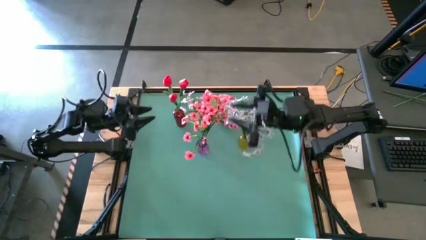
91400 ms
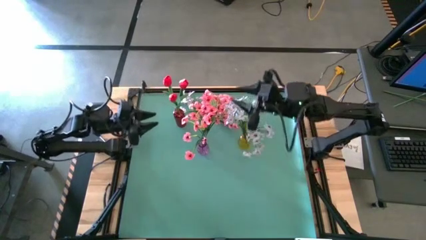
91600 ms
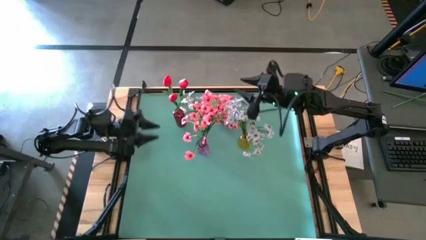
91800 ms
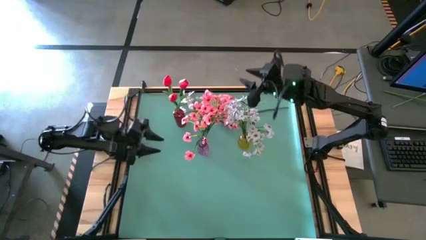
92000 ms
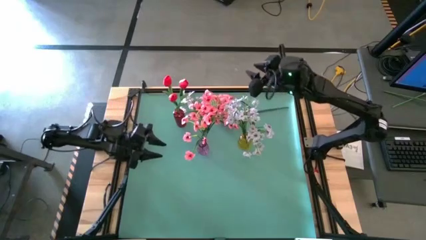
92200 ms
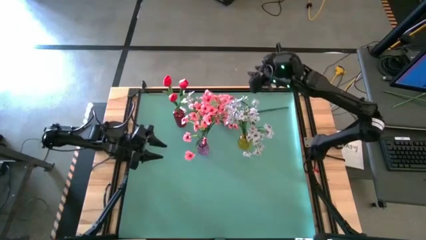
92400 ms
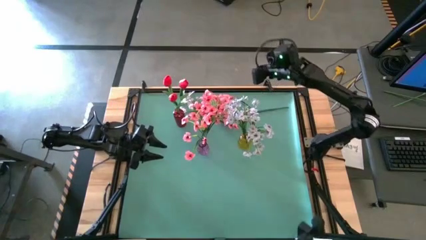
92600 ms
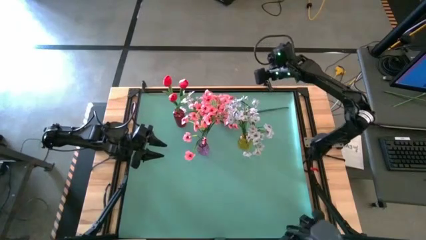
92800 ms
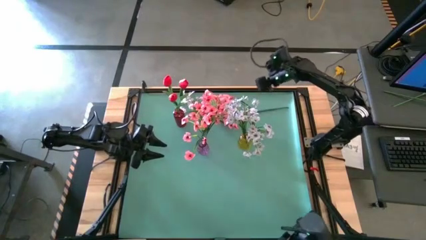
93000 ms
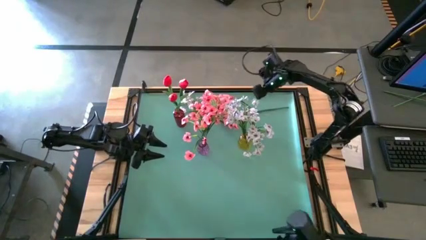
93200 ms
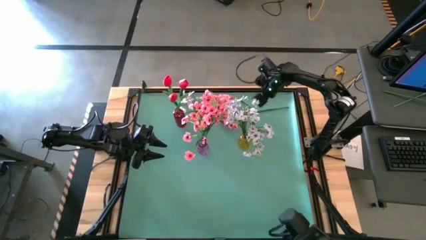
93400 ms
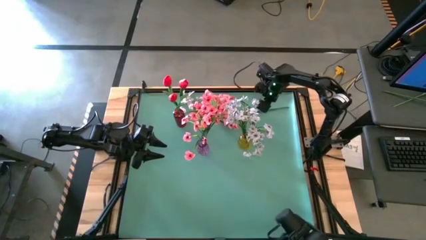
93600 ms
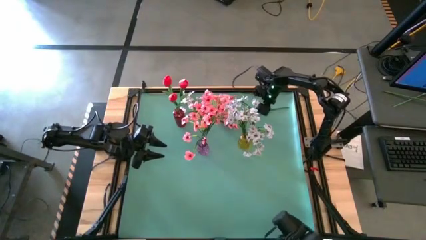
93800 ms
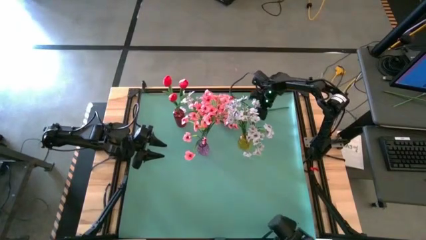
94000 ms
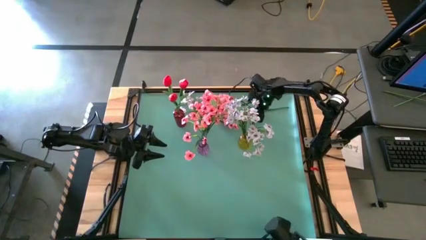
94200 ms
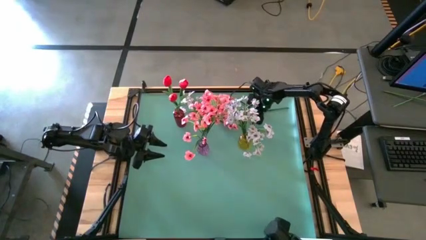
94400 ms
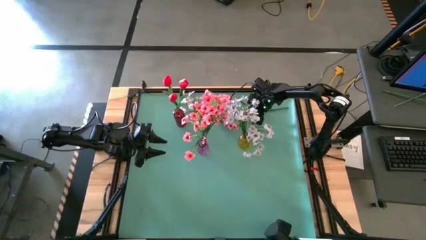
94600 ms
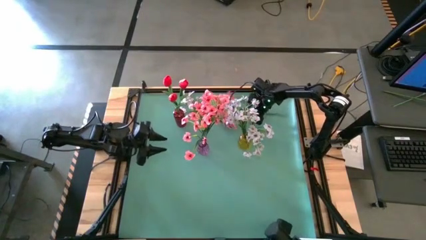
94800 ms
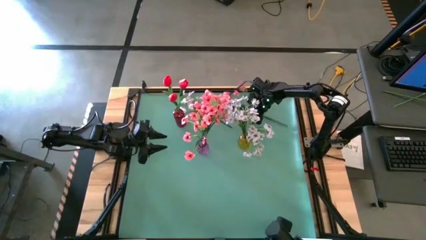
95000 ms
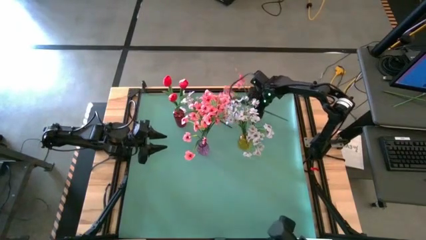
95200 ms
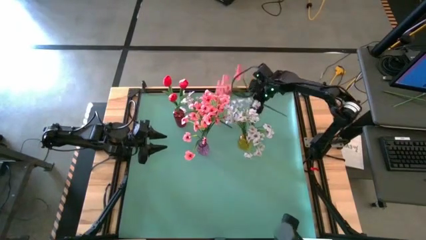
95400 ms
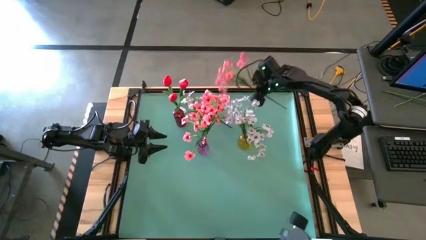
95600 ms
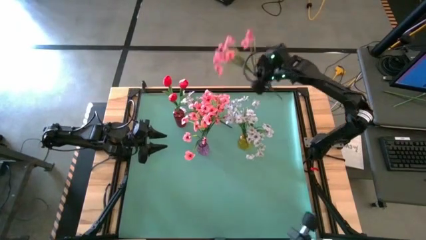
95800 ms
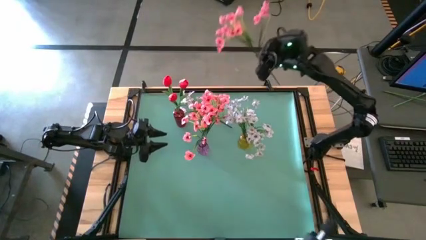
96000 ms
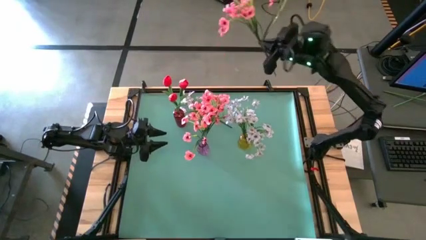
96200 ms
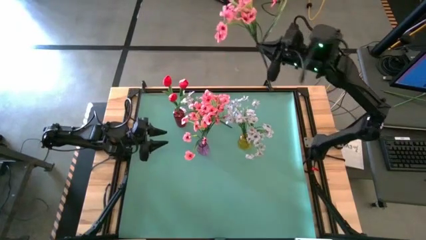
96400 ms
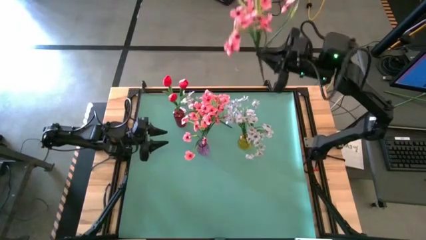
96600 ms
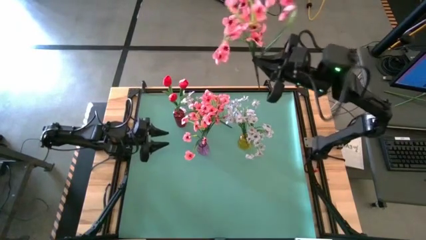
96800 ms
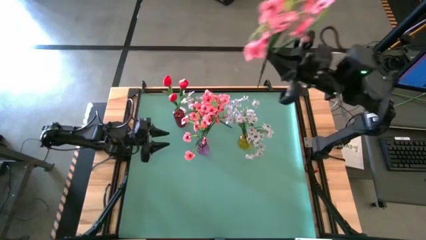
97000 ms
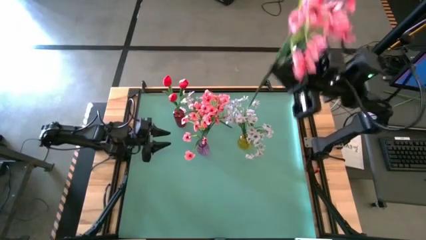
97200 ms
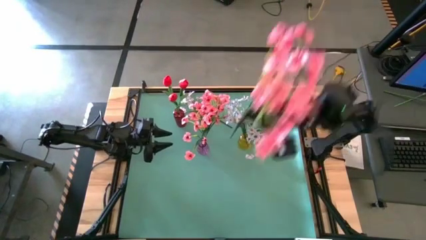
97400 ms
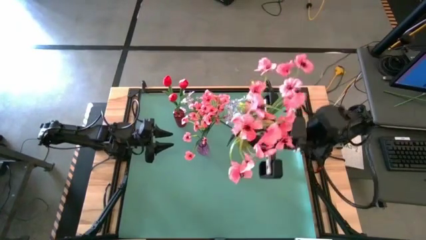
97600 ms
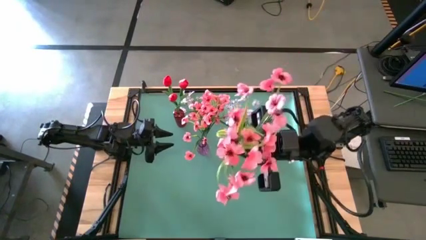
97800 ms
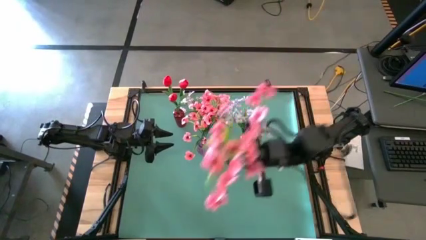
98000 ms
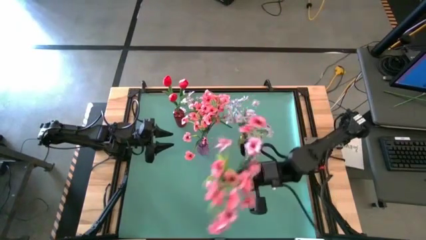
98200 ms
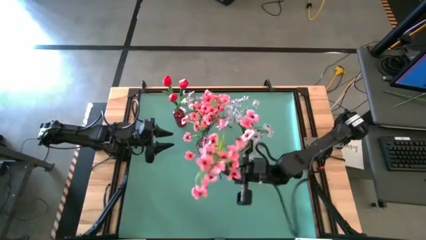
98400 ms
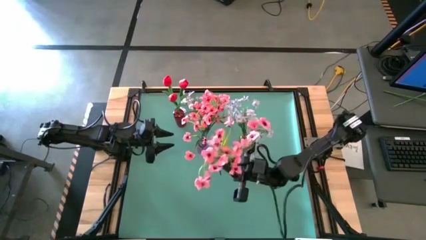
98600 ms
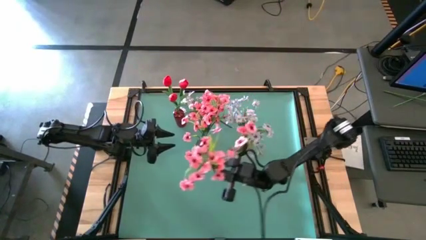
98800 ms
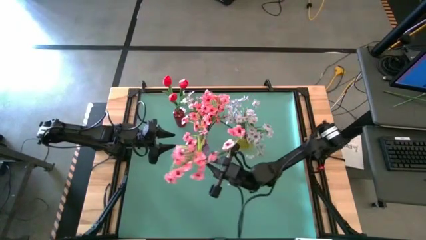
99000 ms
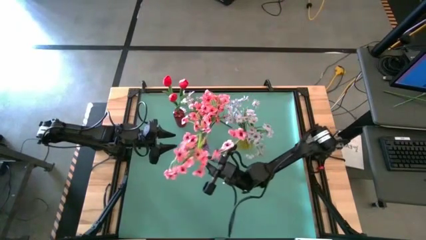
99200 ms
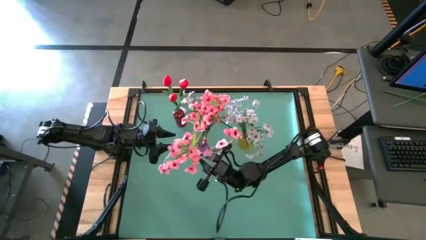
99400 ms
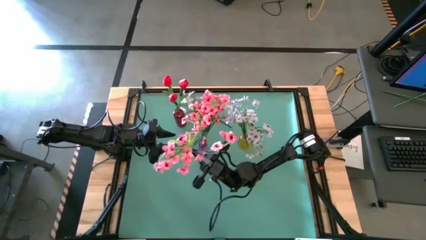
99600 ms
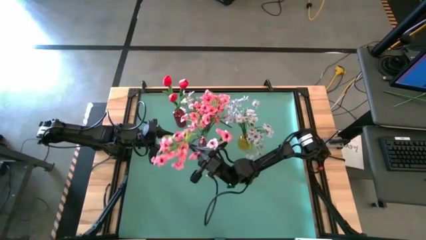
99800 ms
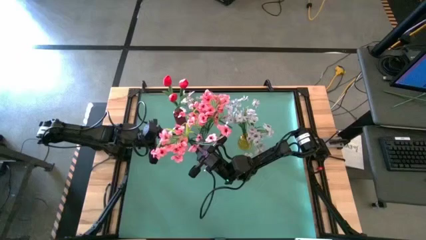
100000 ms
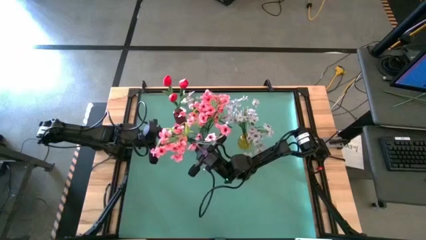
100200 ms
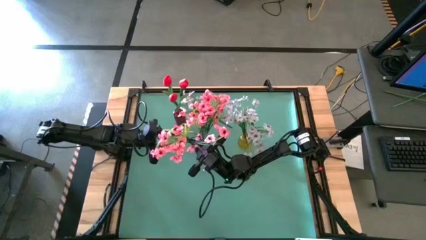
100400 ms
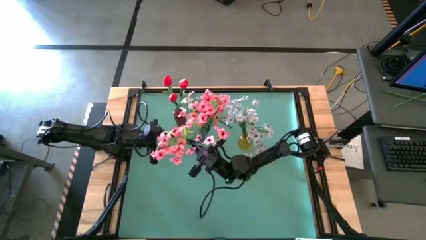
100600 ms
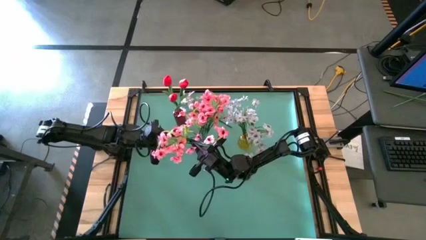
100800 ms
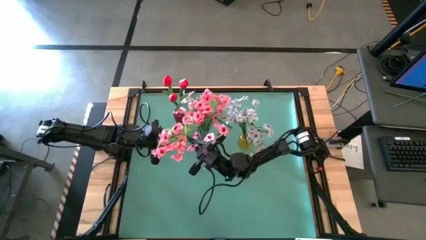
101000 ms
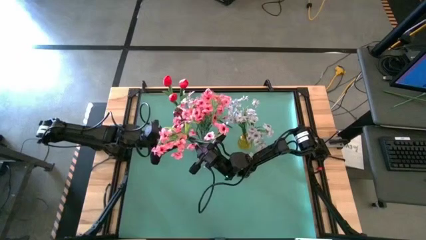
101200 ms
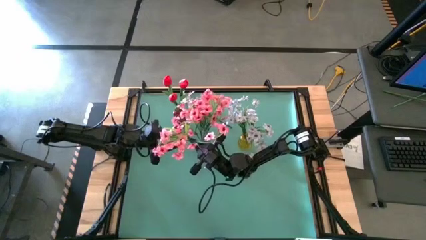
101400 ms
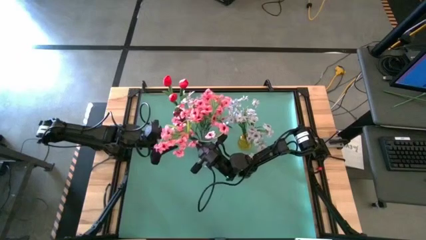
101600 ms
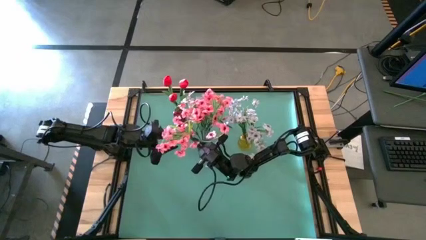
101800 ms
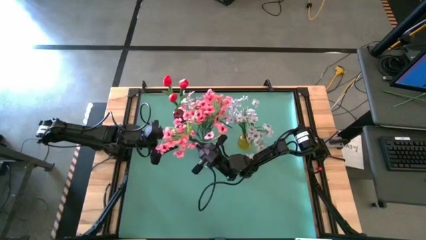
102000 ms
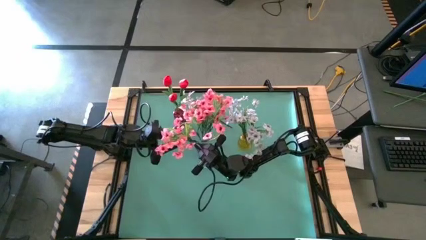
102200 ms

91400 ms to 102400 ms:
Task: Sort flowers into vase by color
Put the pink flower into the purple vase
